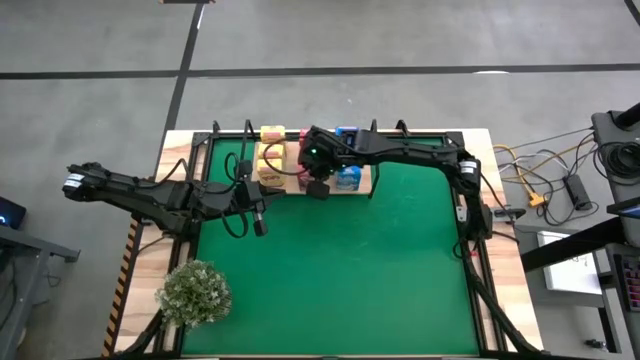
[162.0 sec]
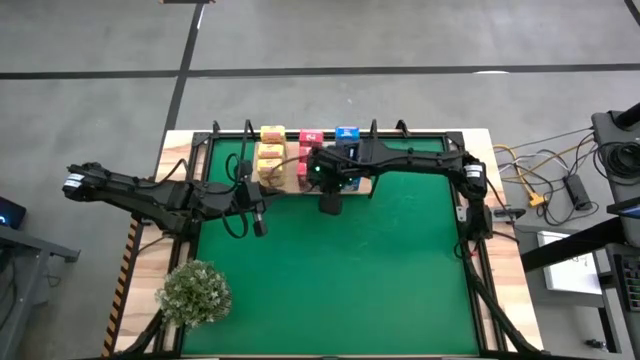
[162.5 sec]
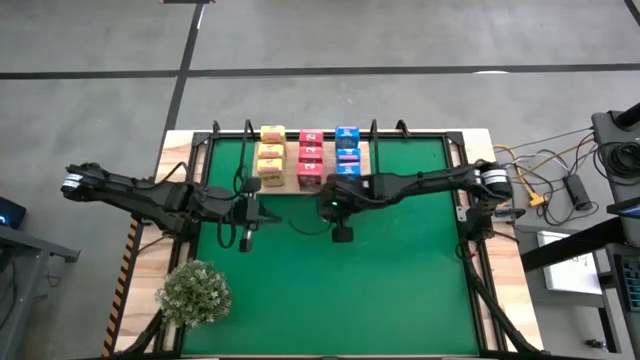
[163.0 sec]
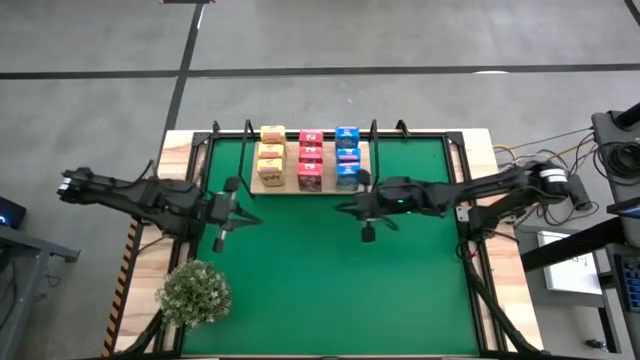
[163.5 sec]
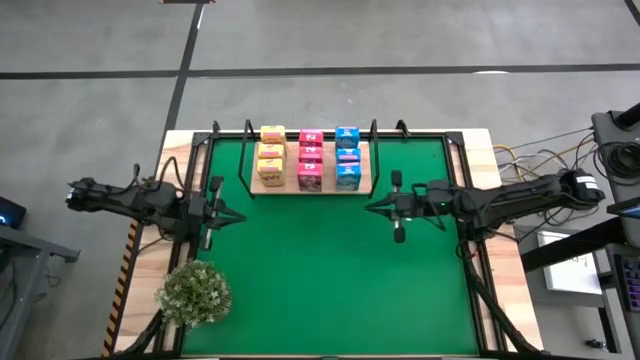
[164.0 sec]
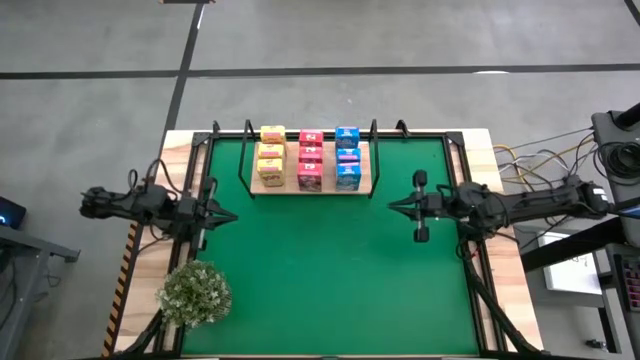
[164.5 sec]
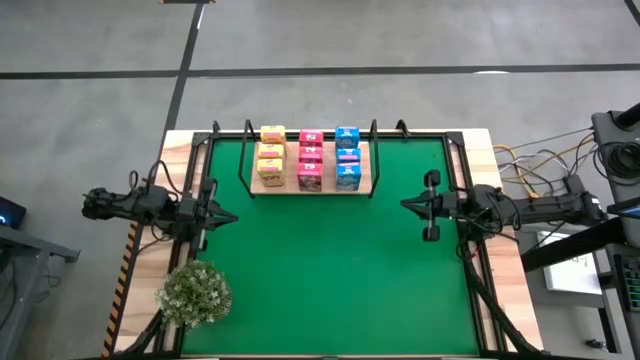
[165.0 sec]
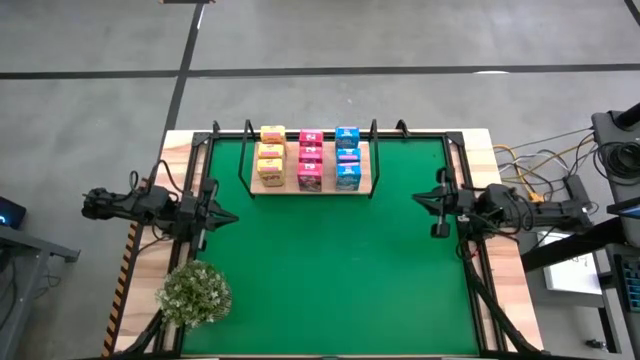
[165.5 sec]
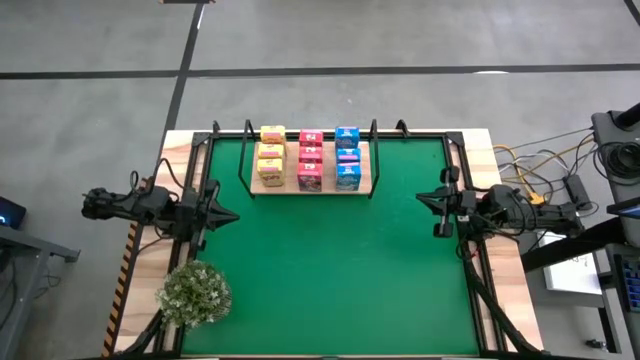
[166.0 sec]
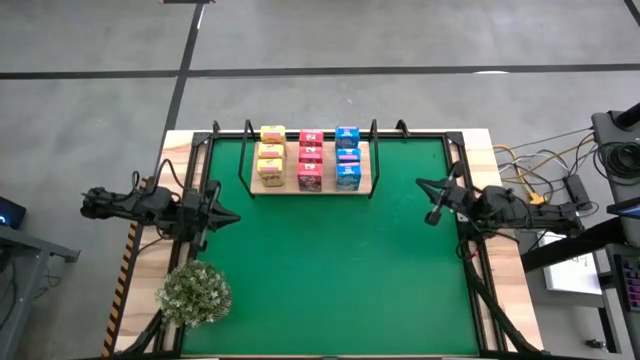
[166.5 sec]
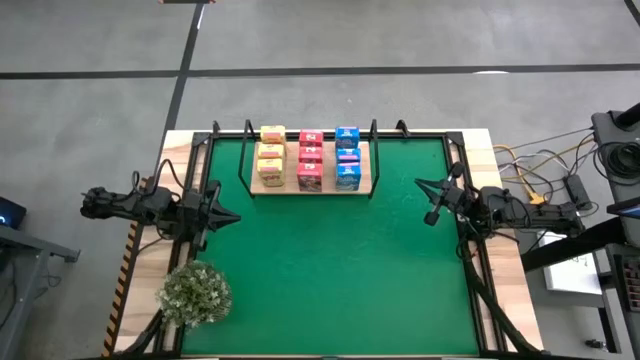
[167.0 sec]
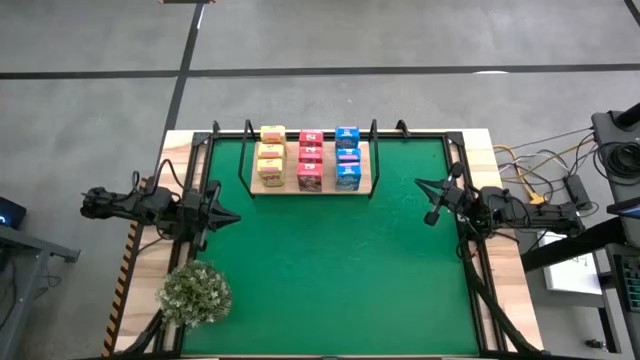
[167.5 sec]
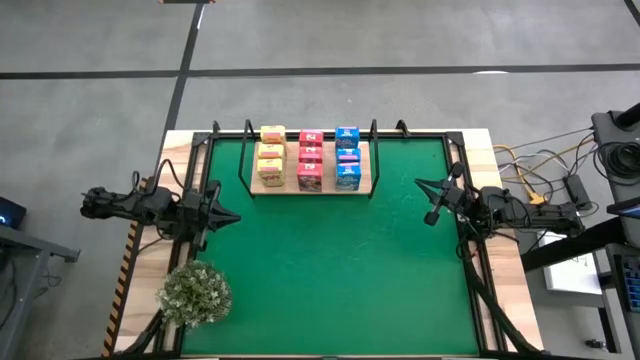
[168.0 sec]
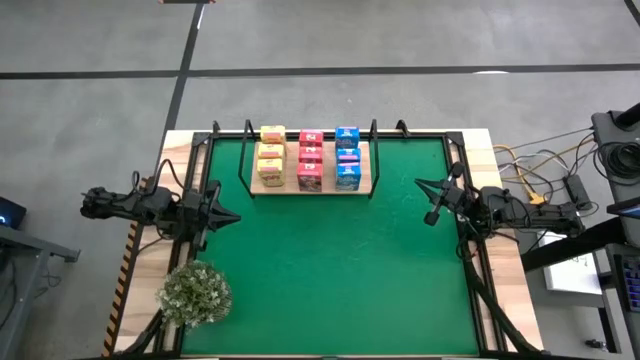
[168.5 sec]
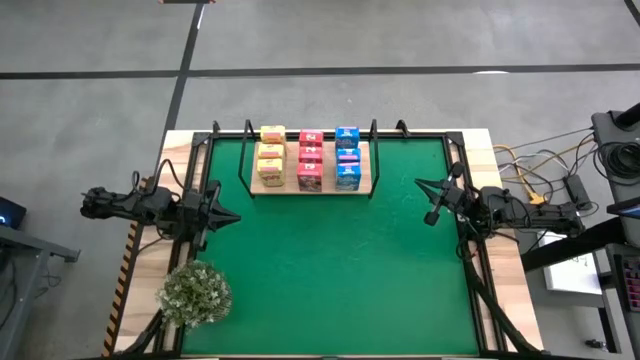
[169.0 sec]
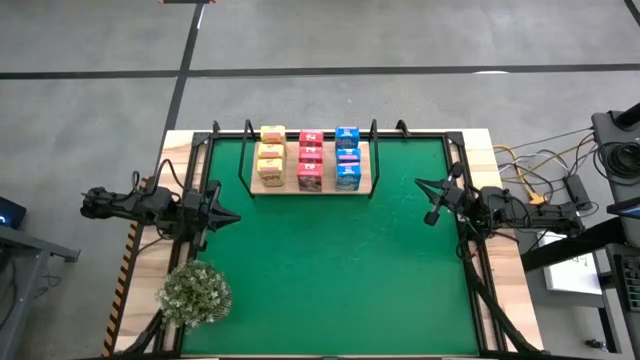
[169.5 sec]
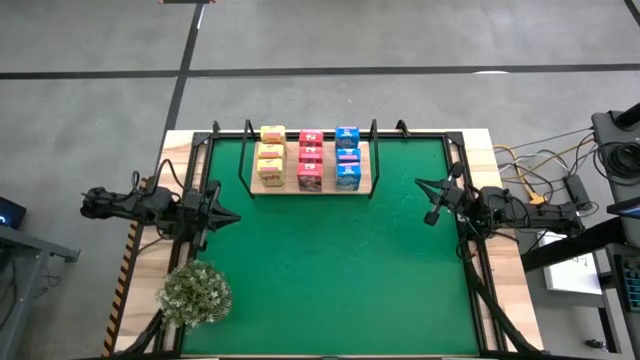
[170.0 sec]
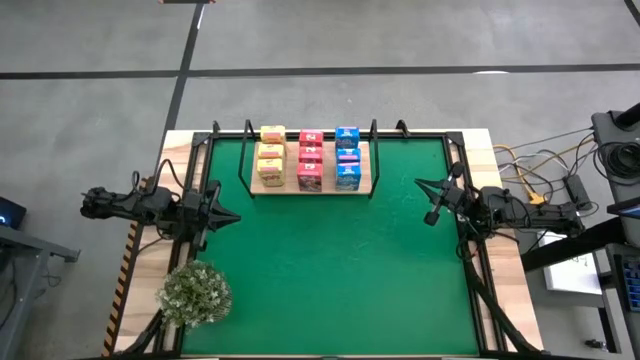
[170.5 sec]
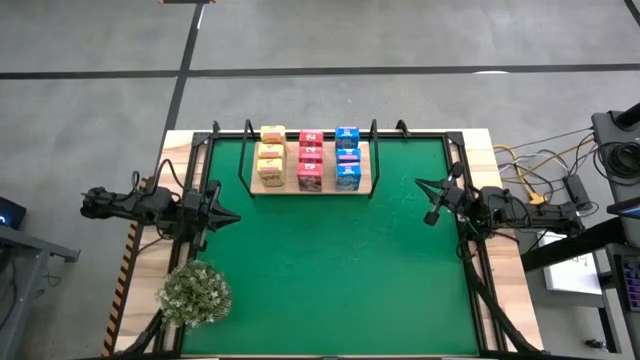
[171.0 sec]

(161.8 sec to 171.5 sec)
Task: Stack cereal on shelf
Return to Home Position

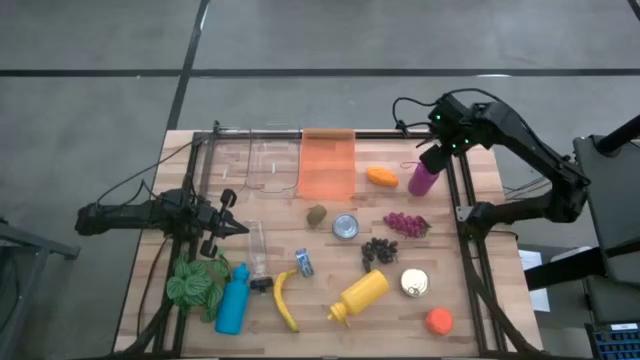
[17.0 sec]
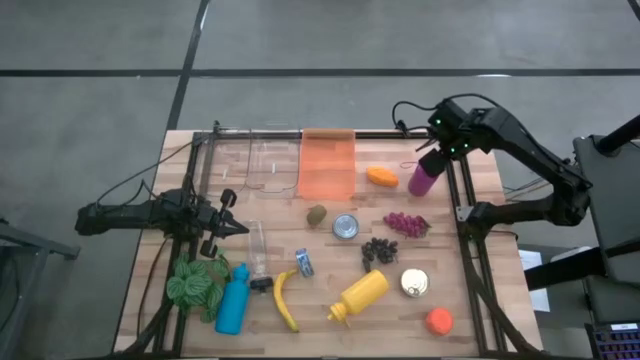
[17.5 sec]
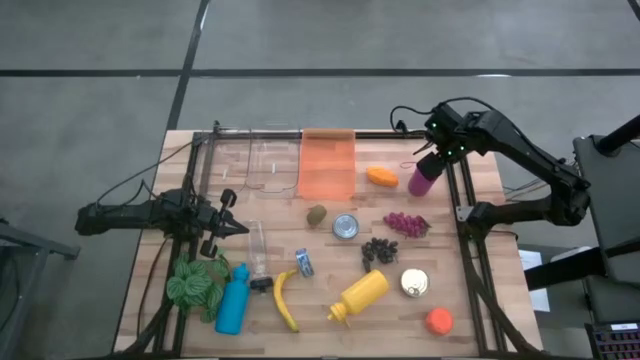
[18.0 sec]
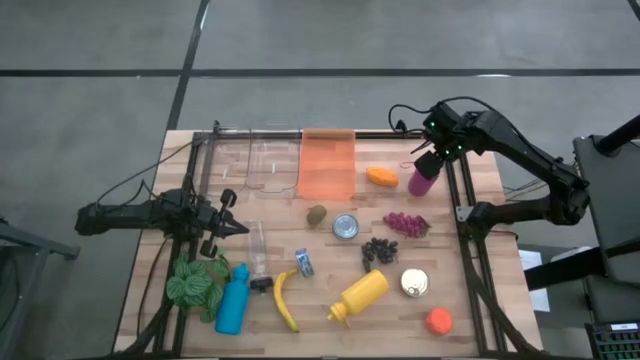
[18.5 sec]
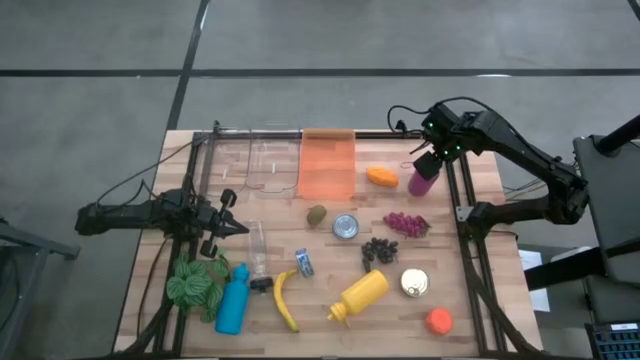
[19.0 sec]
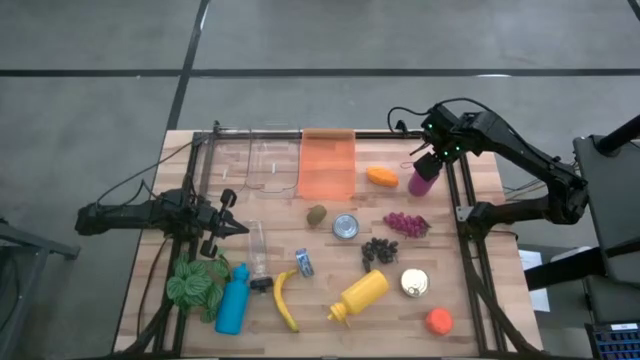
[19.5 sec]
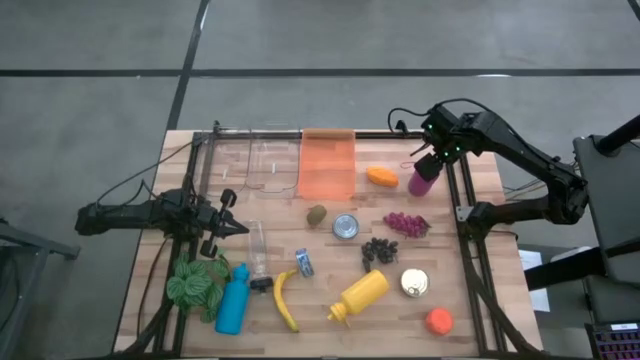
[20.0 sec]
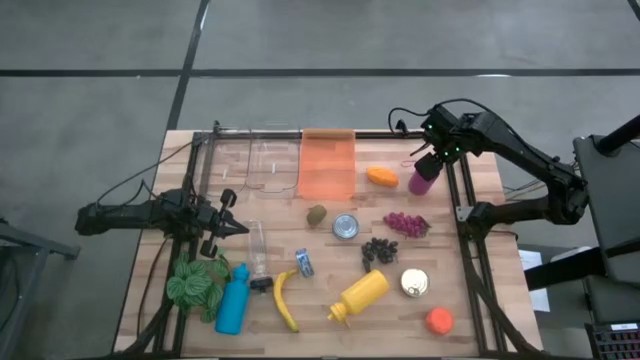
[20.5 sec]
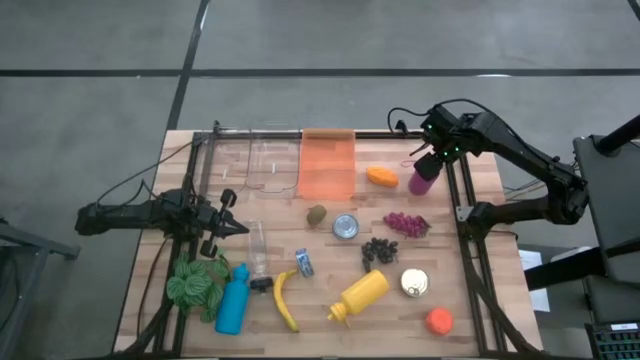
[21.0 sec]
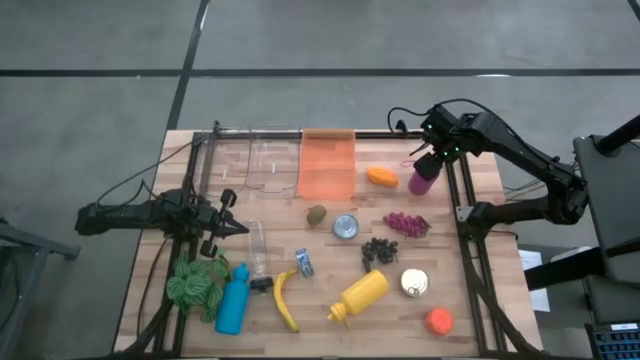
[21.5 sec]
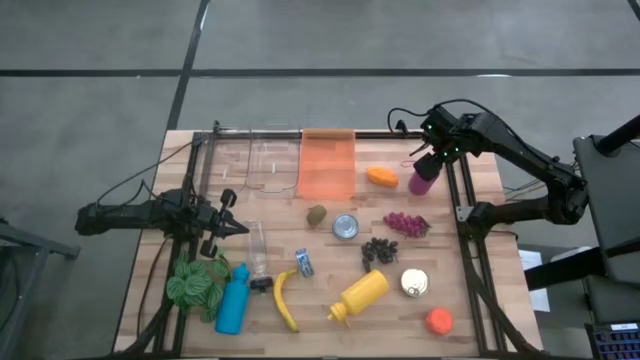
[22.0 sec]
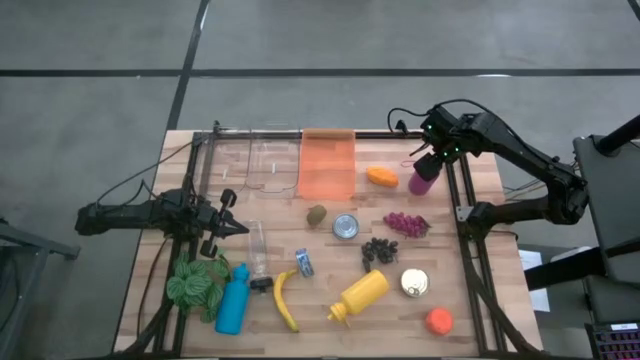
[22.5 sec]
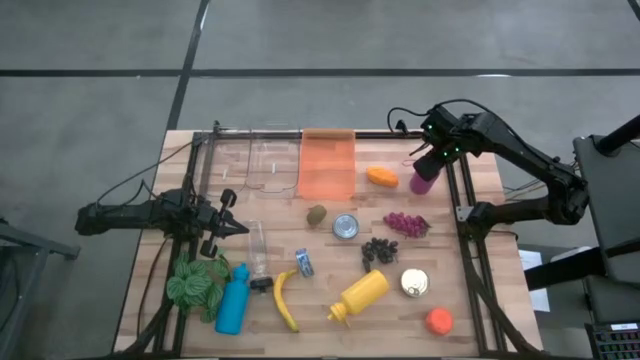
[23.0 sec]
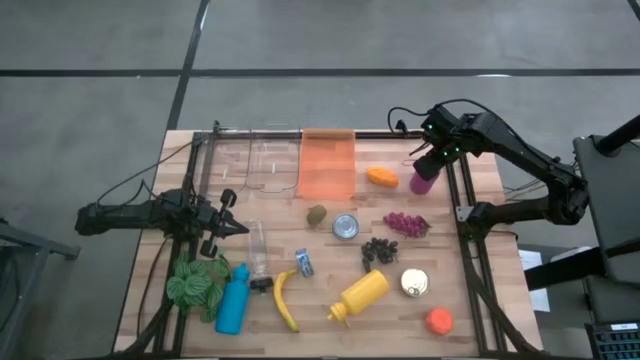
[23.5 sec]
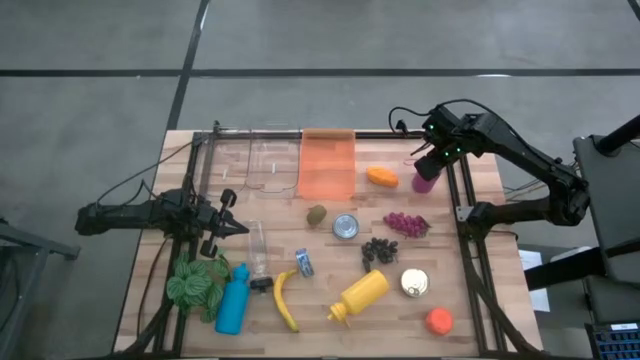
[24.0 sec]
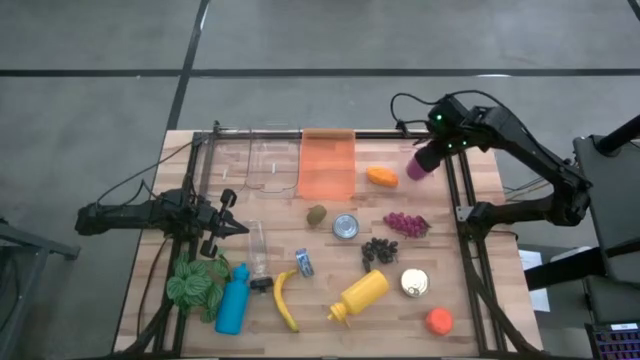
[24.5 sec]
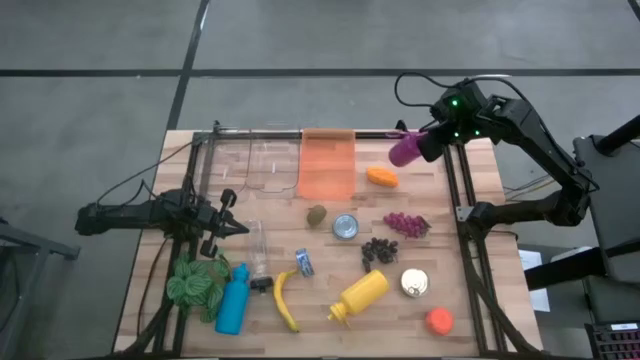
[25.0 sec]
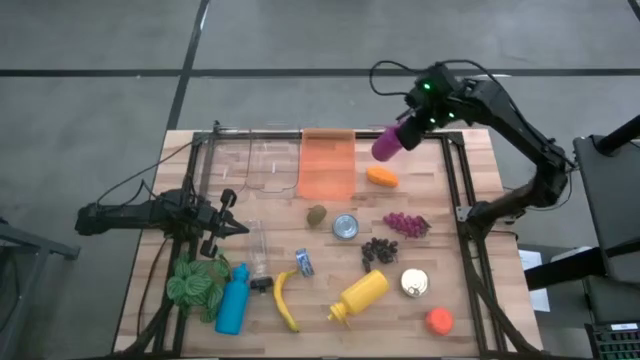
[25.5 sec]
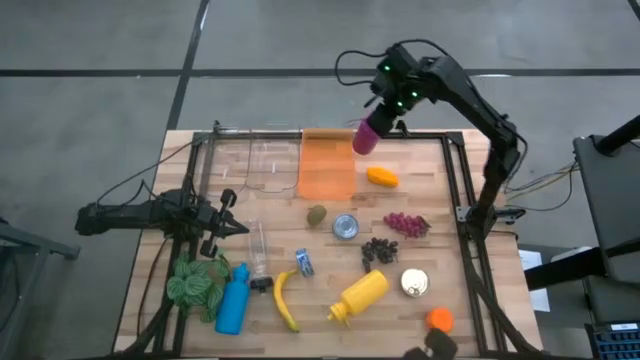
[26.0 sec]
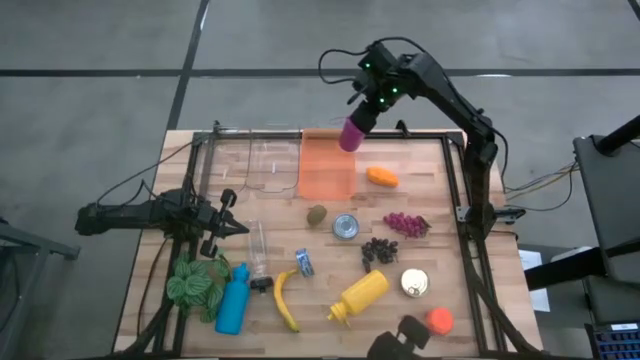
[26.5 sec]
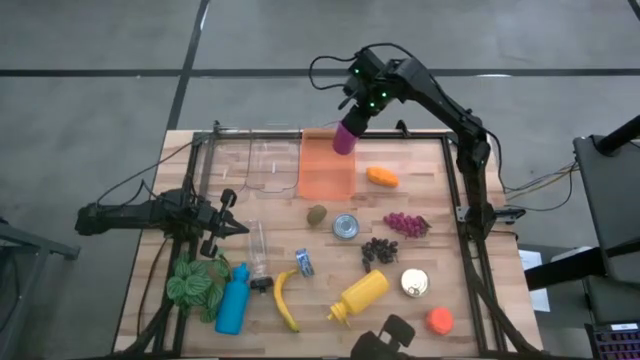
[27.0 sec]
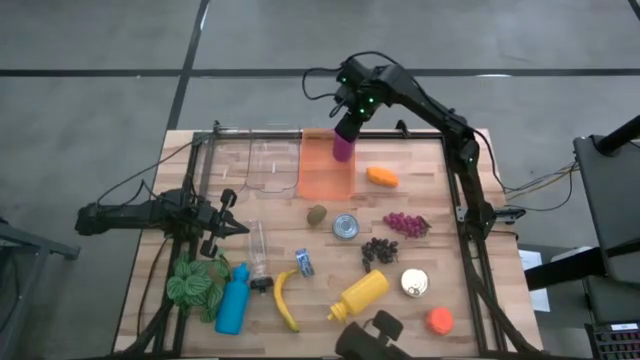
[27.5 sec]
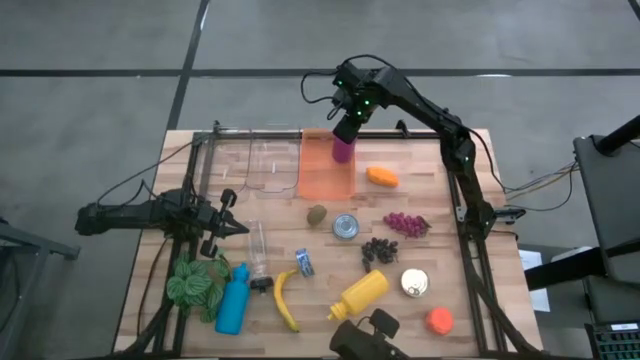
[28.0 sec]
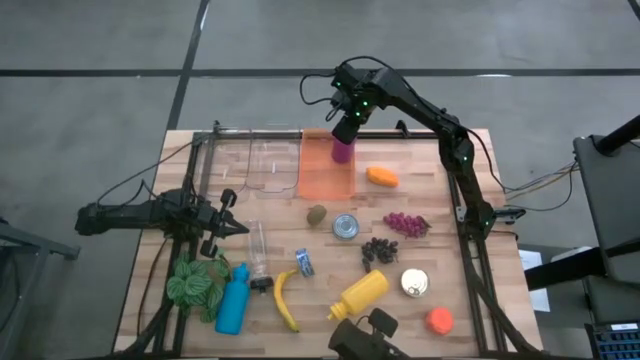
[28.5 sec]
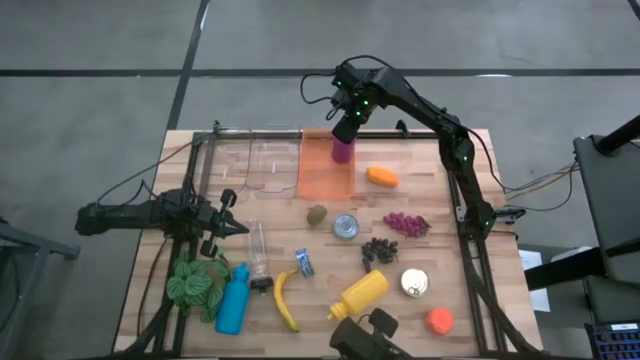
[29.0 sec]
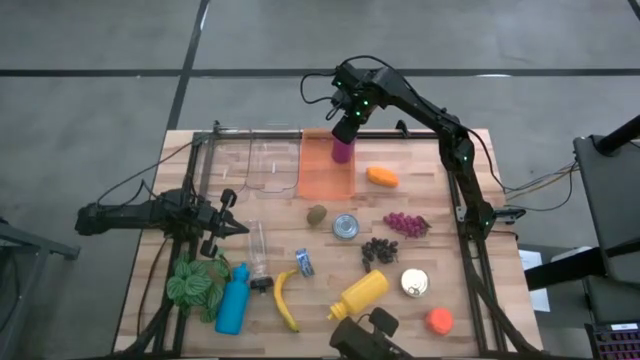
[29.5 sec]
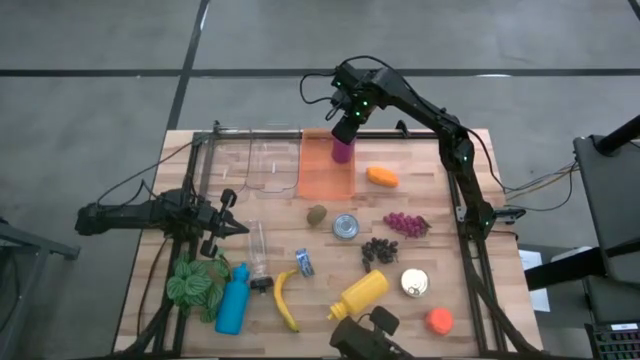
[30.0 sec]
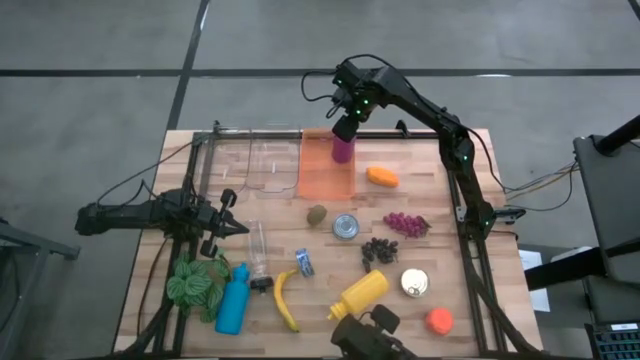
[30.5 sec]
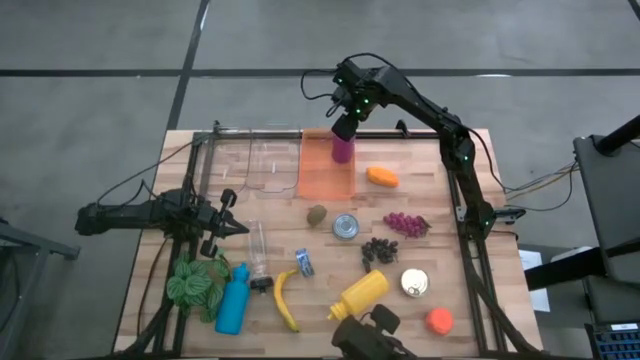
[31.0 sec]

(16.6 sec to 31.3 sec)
Task: Pick & Place Food Item
Put the purple tumbler into the orange bin
